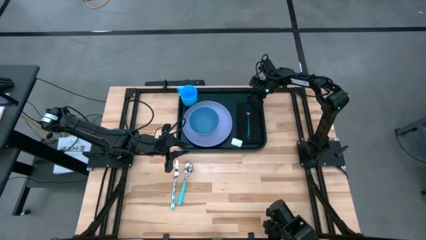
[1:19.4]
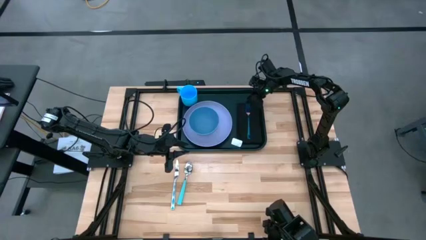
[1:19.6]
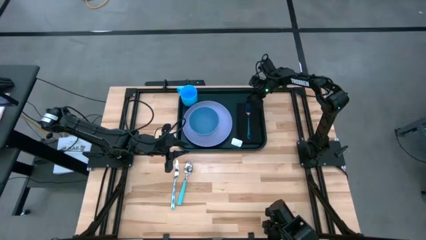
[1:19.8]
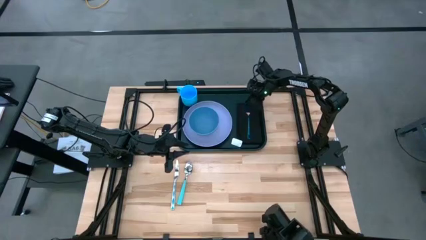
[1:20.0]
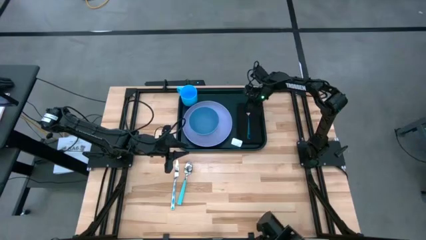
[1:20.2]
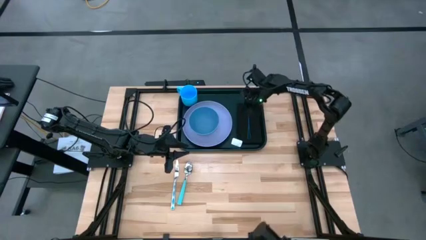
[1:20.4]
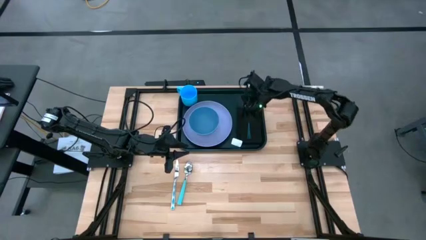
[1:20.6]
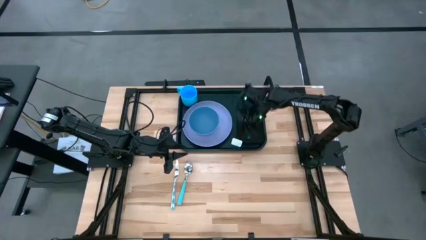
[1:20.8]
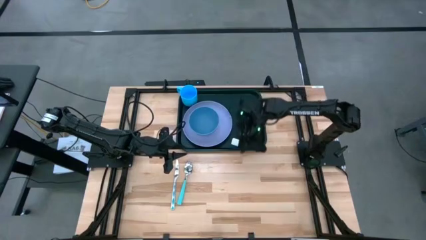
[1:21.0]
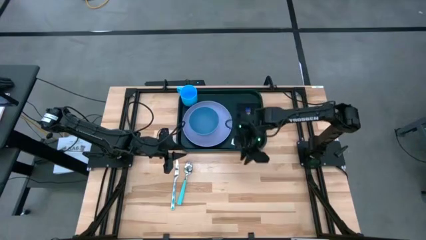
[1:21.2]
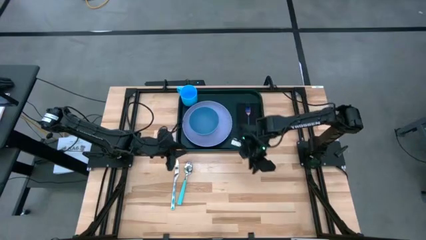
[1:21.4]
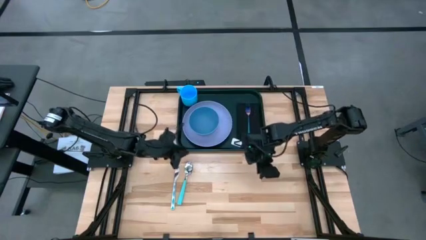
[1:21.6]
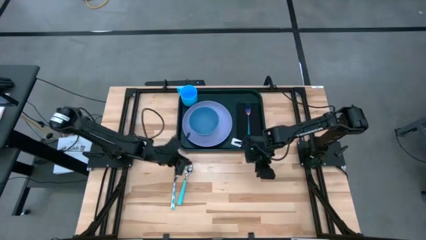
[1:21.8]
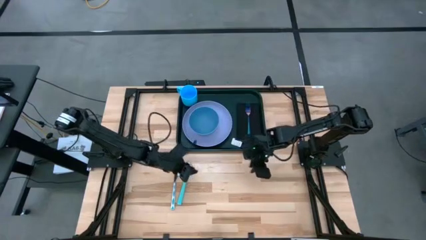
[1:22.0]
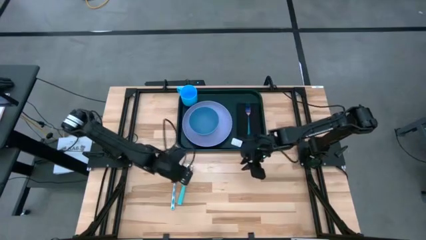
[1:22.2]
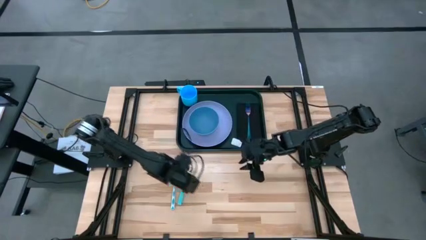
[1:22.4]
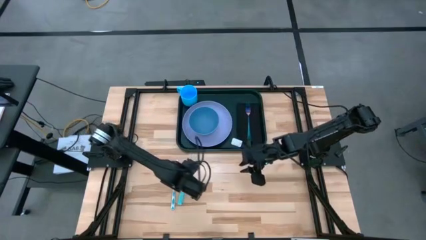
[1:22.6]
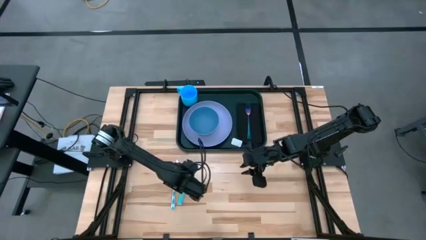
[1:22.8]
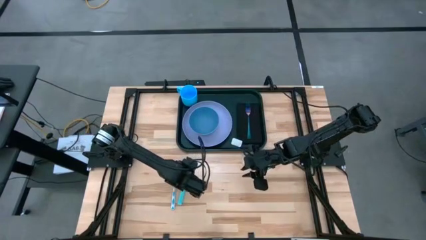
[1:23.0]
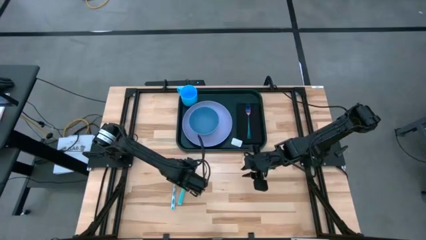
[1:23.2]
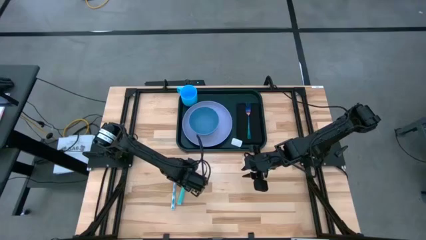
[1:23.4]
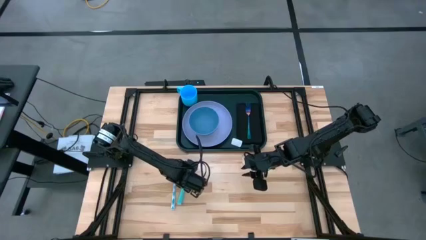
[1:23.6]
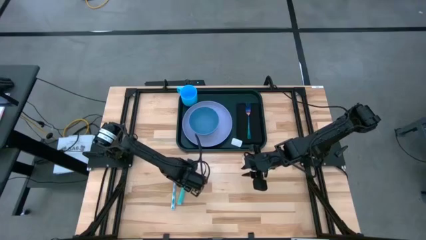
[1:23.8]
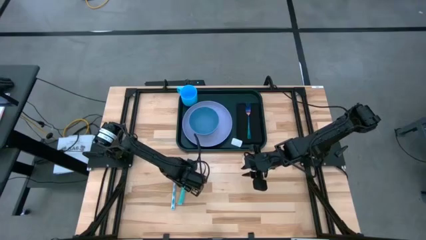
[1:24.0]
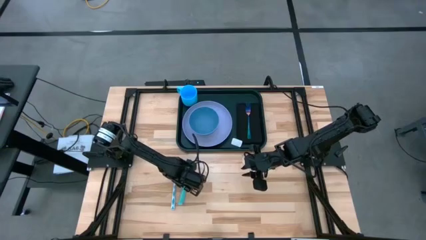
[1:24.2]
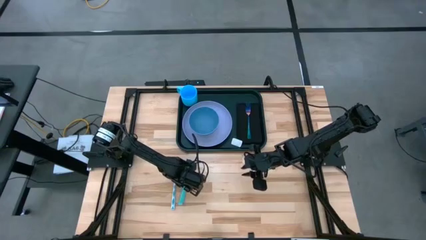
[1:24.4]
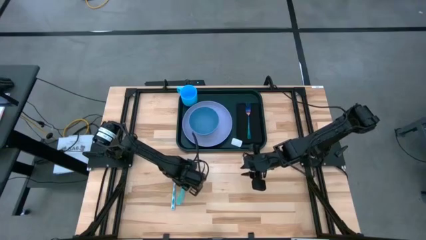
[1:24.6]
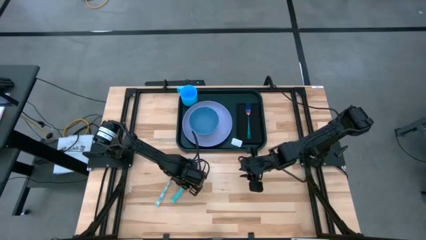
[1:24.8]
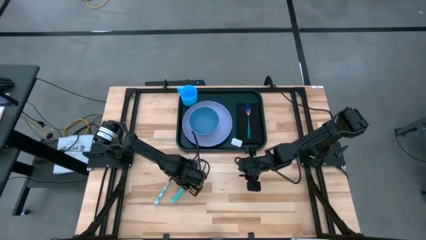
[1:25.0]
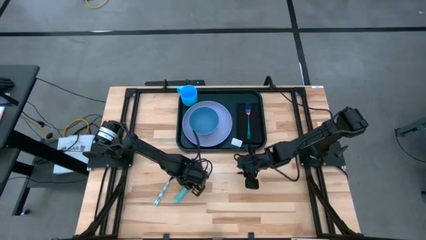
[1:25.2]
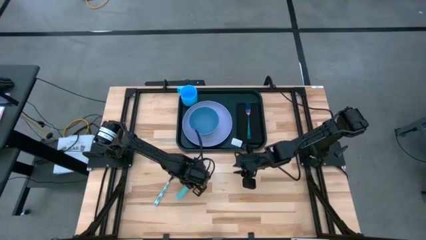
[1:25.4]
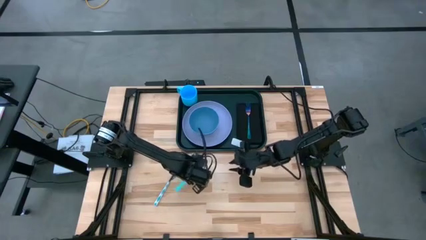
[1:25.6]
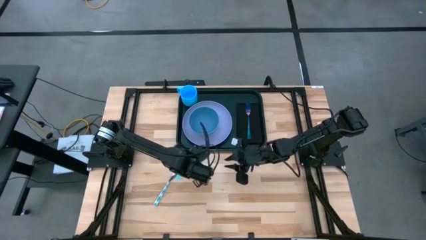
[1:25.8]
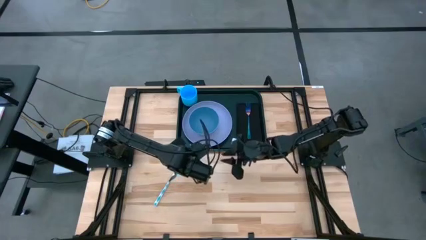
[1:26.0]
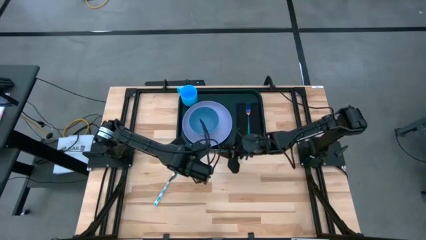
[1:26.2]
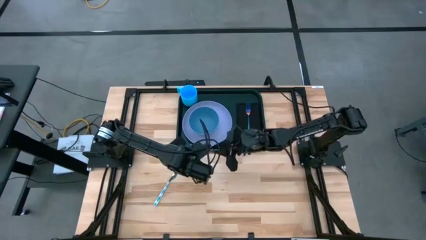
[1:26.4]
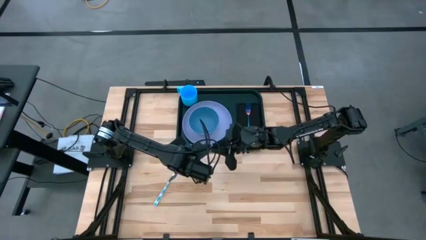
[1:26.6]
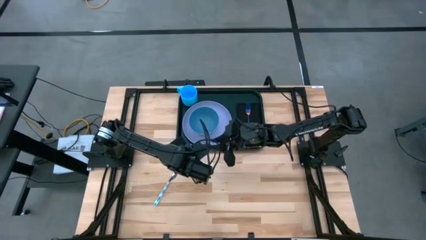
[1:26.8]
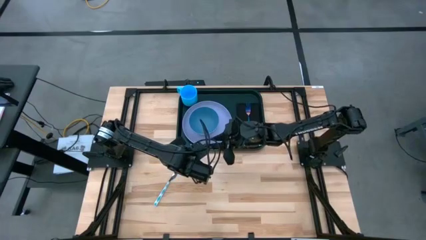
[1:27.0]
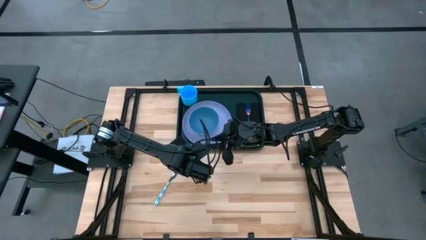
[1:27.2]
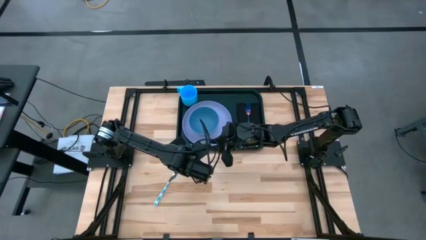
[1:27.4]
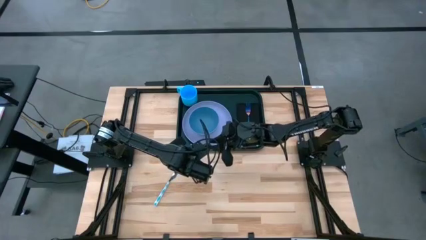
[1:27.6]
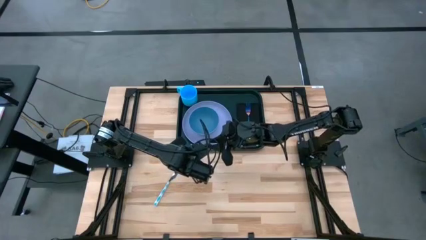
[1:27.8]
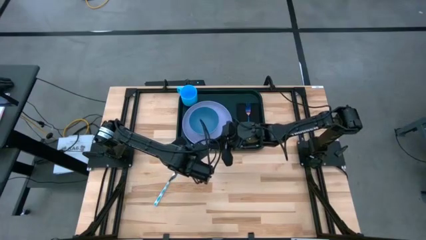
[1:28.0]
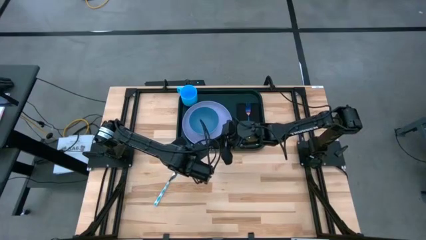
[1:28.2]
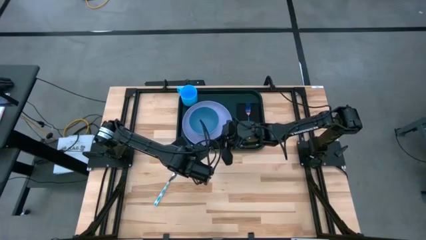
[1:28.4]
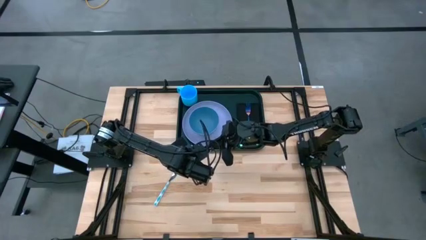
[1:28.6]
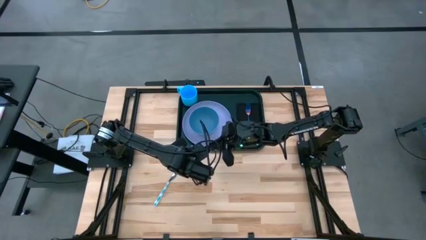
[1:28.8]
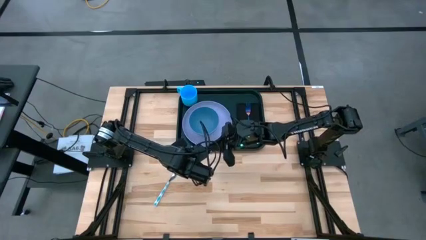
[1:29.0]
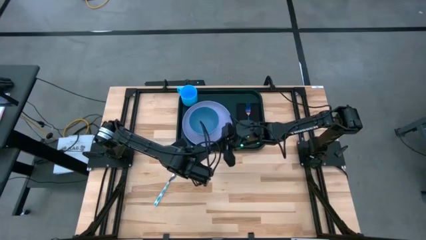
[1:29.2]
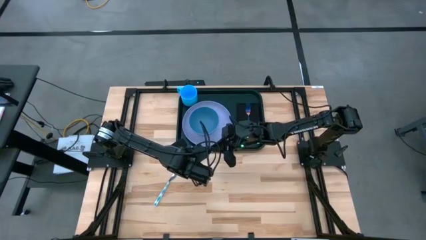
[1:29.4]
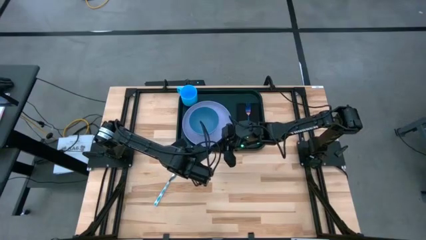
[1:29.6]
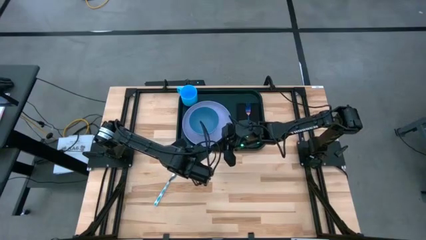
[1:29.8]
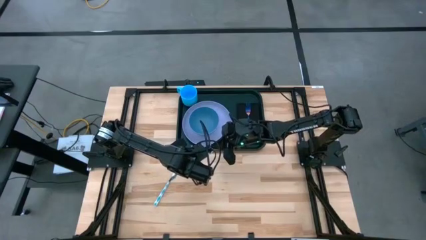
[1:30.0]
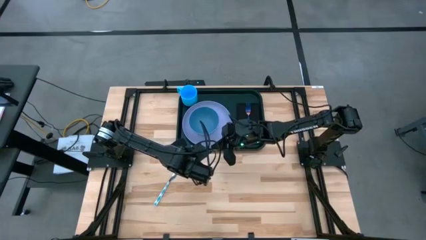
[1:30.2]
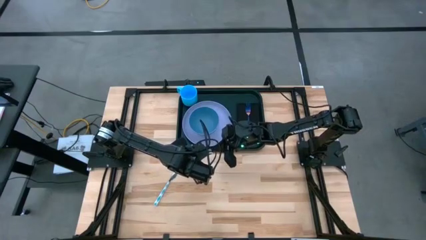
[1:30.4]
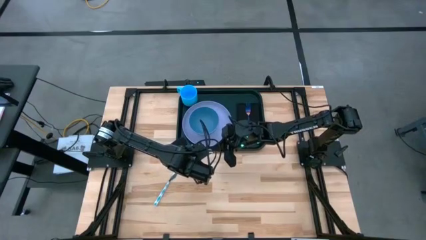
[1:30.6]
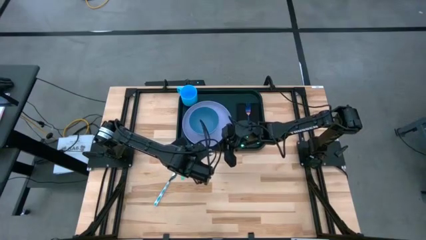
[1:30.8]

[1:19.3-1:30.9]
Task: Set up tray
Put the blue spoon on the black napkin to the left of the blue fork on the black tray

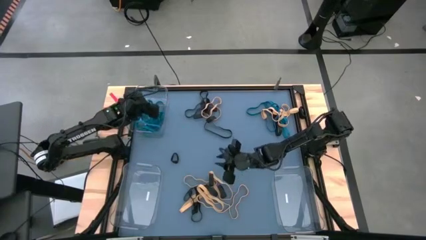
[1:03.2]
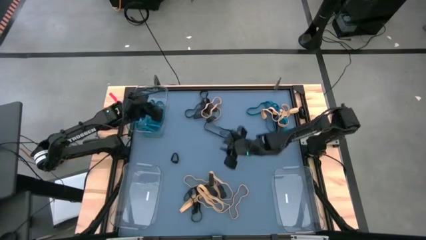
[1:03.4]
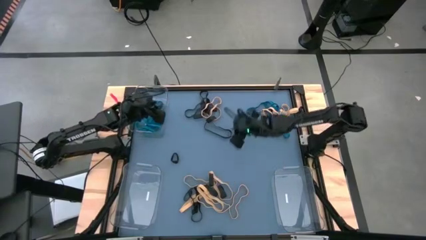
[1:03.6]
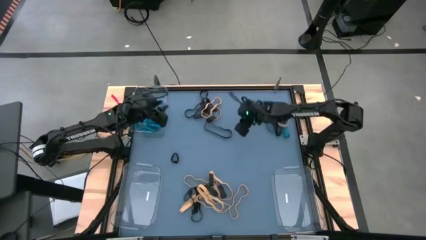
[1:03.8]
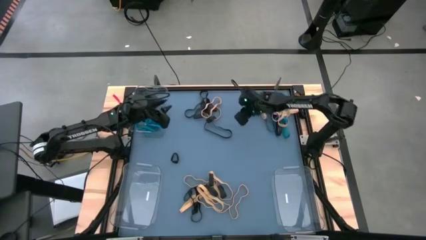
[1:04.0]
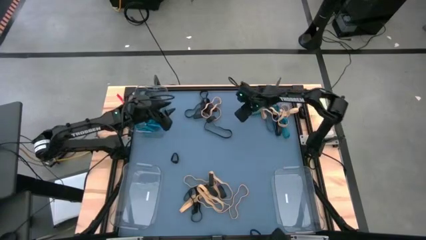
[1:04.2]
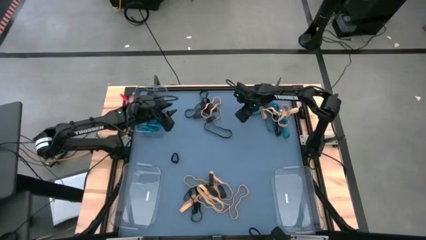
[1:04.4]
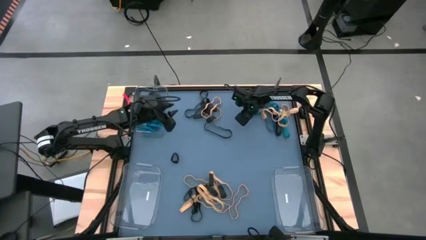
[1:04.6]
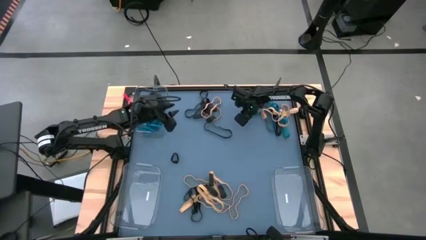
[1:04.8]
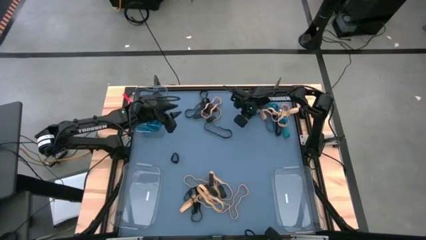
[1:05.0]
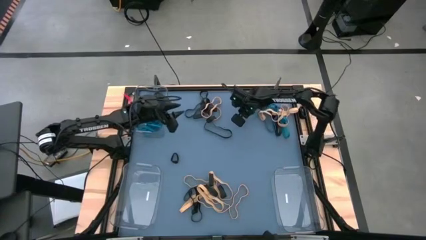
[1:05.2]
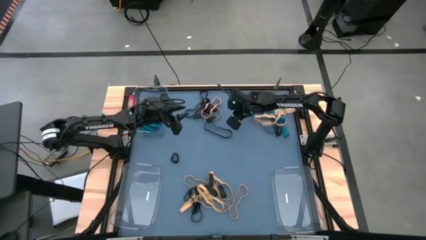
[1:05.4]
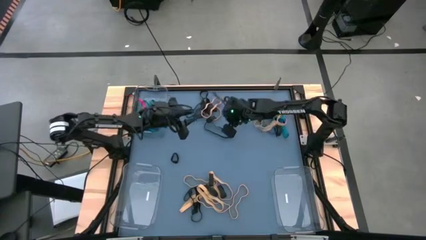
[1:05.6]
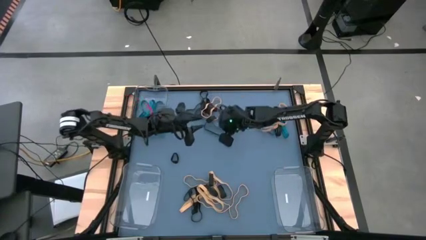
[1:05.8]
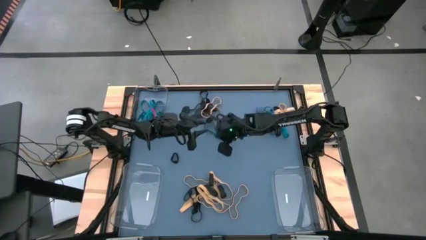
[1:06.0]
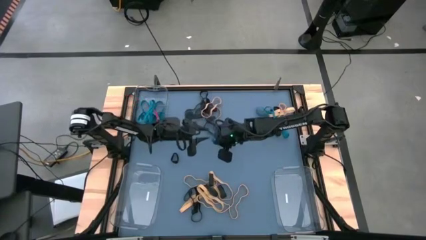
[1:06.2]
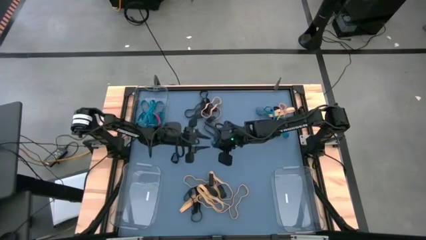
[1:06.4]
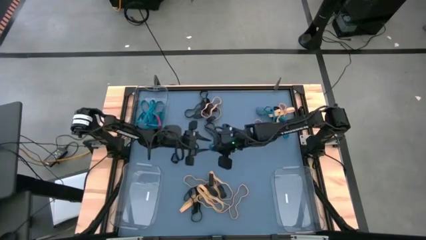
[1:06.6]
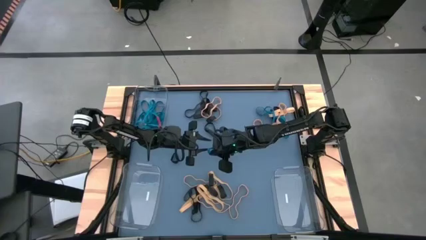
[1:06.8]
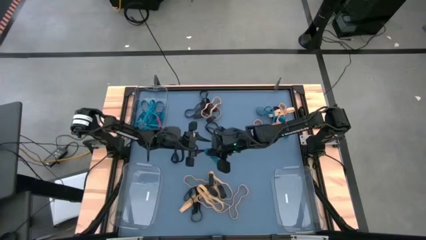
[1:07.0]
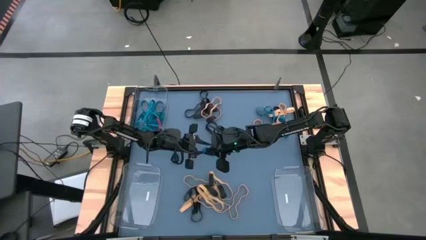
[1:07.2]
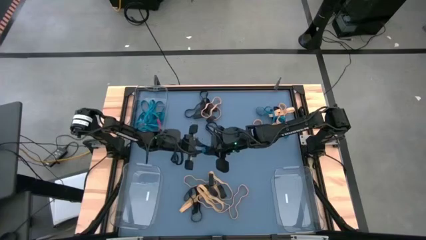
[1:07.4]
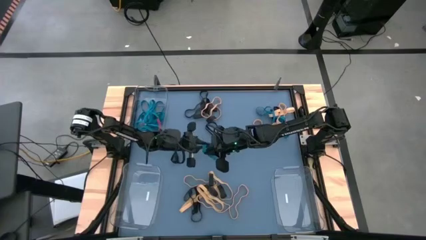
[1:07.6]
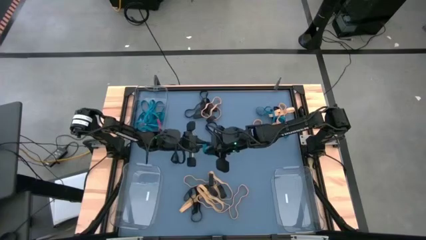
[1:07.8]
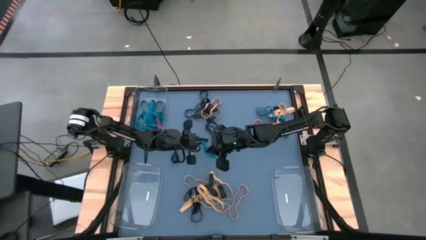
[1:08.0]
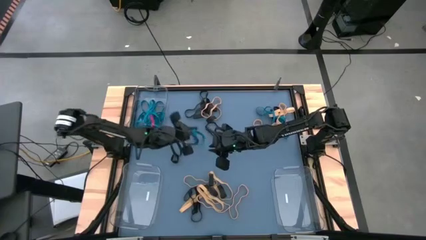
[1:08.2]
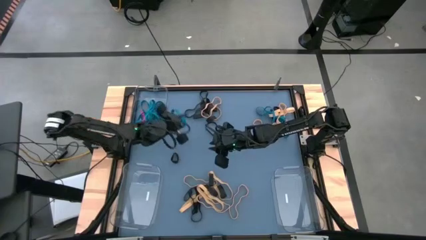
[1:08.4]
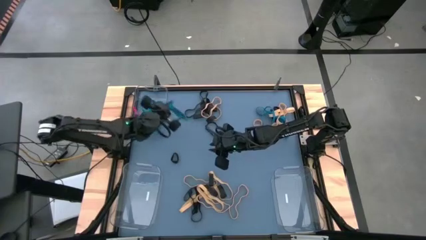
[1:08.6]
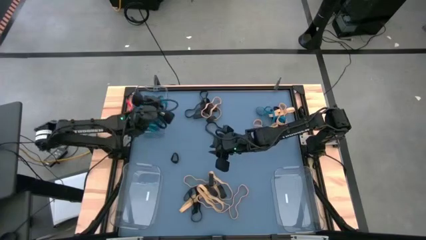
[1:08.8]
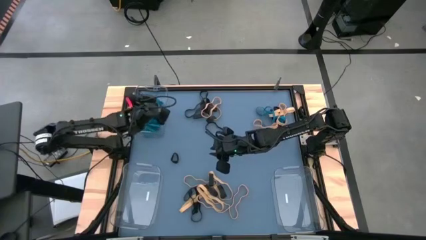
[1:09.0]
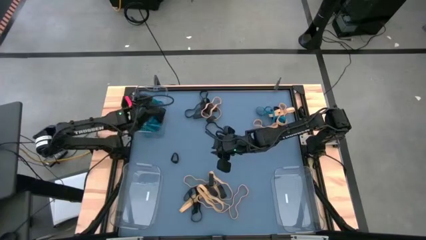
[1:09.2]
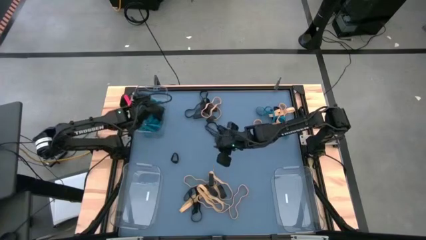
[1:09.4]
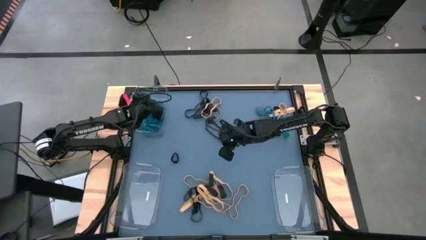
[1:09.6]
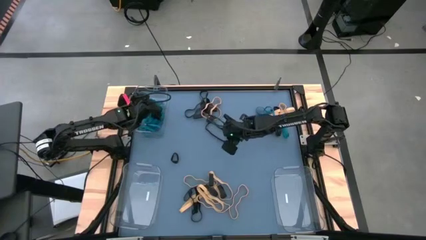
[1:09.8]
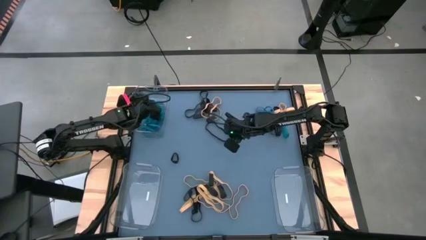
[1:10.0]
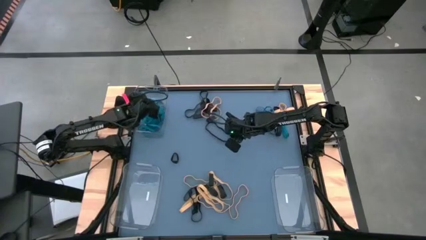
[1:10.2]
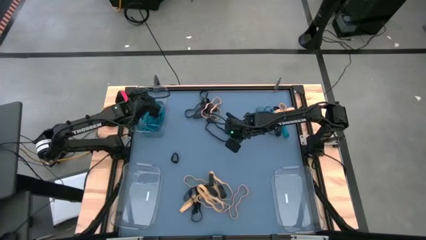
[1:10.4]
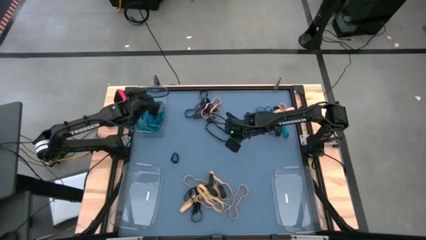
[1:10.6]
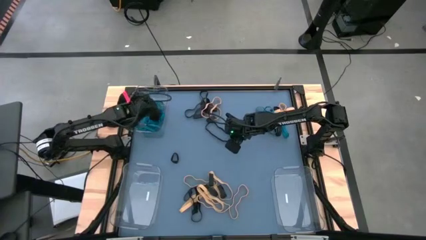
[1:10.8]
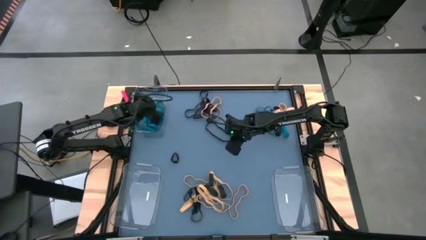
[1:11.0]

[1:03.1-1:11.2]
Task: Sort rubber bands into baskets
Put the blue rubber band into the top transparent bin
